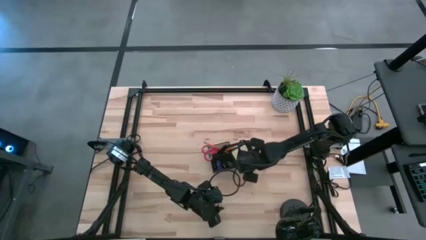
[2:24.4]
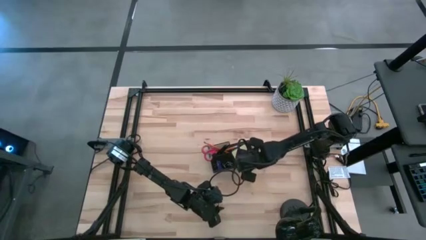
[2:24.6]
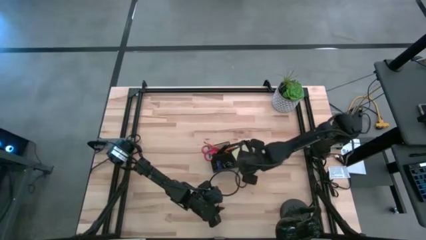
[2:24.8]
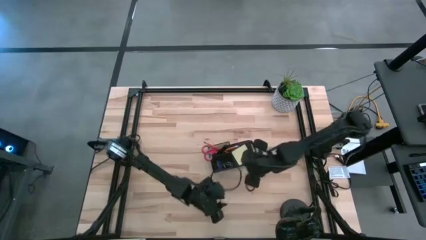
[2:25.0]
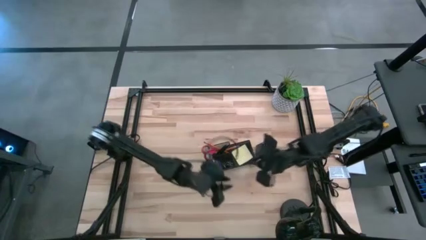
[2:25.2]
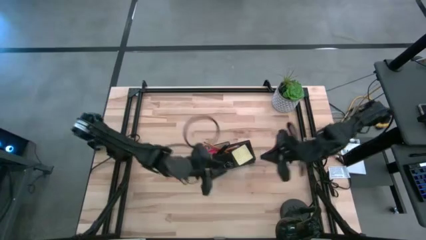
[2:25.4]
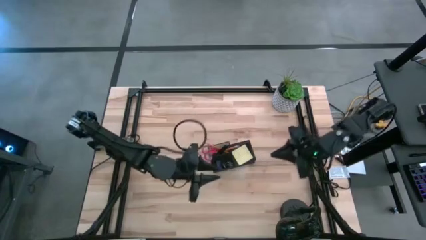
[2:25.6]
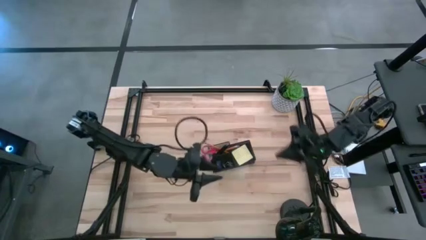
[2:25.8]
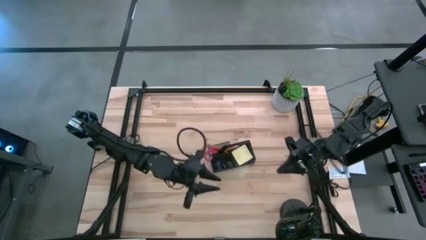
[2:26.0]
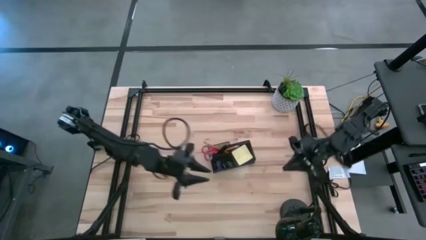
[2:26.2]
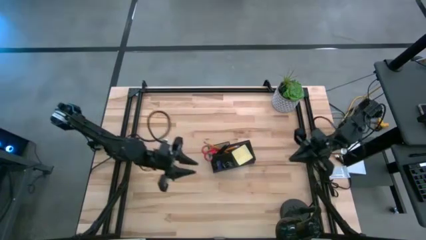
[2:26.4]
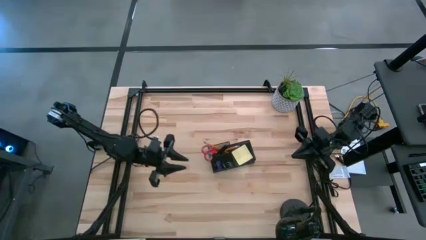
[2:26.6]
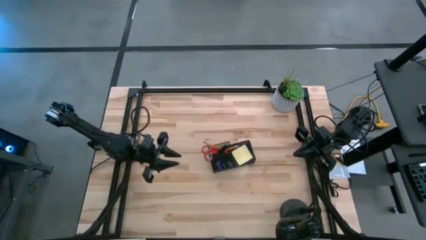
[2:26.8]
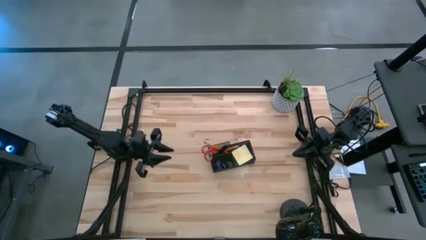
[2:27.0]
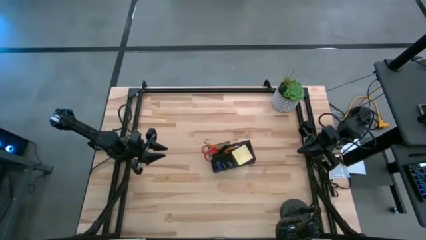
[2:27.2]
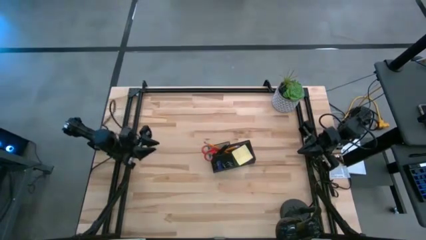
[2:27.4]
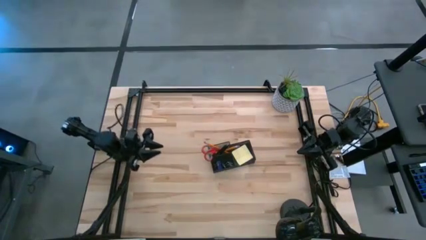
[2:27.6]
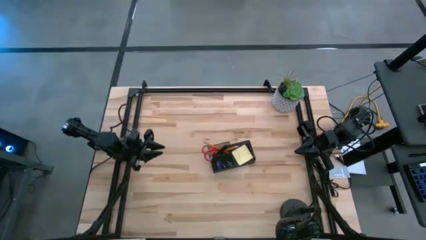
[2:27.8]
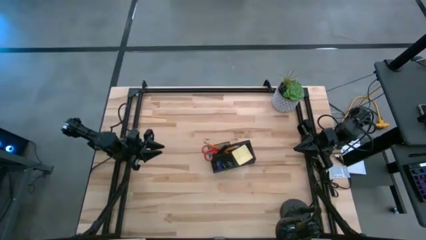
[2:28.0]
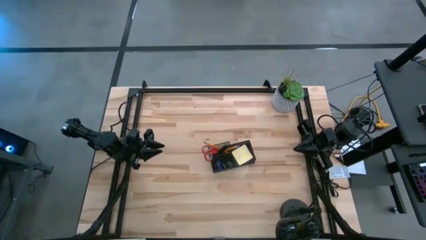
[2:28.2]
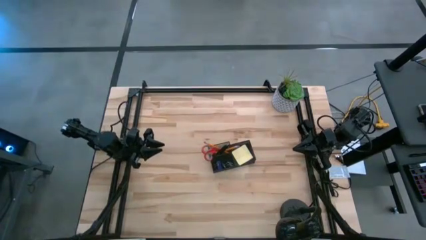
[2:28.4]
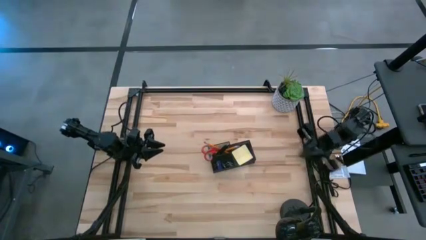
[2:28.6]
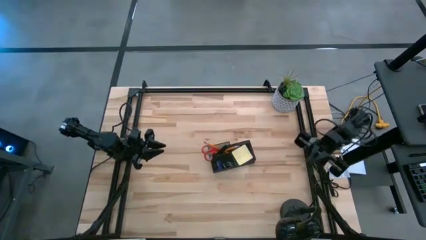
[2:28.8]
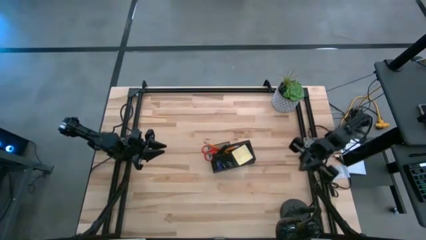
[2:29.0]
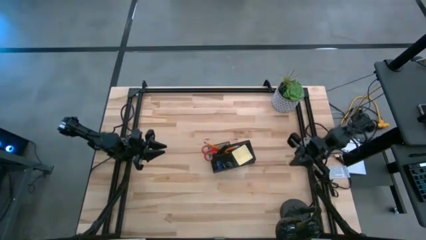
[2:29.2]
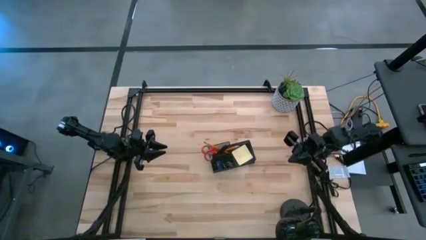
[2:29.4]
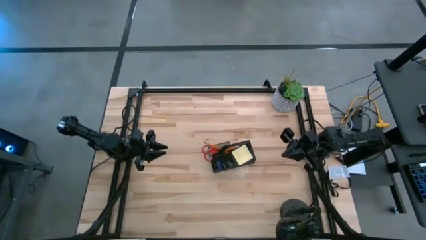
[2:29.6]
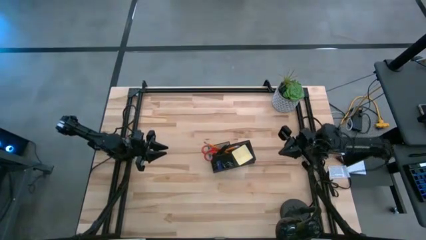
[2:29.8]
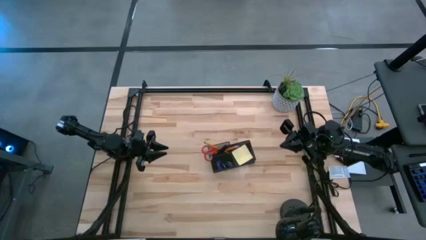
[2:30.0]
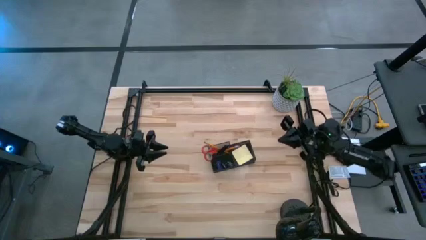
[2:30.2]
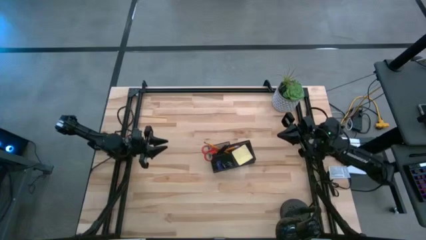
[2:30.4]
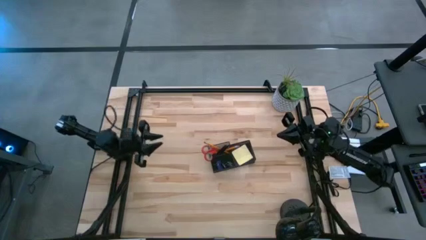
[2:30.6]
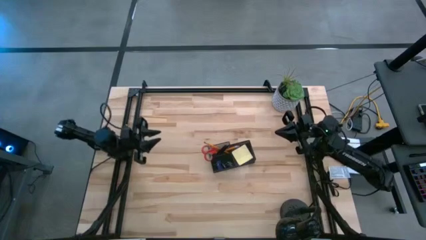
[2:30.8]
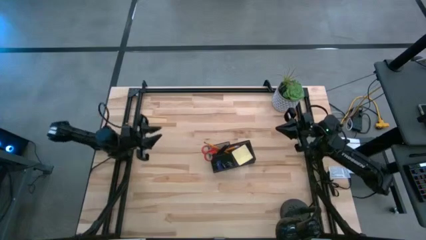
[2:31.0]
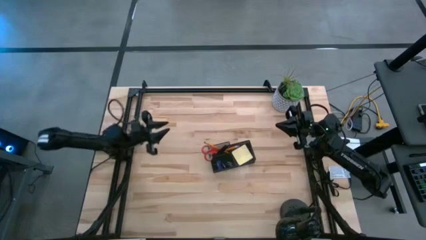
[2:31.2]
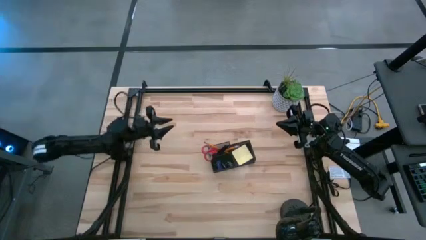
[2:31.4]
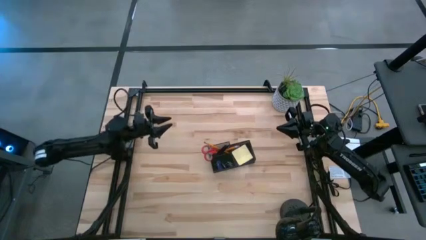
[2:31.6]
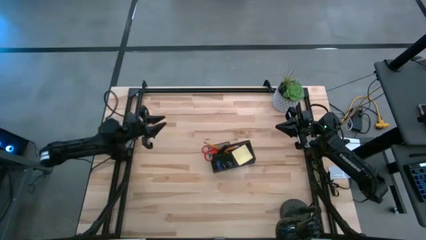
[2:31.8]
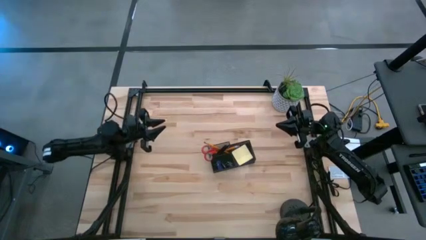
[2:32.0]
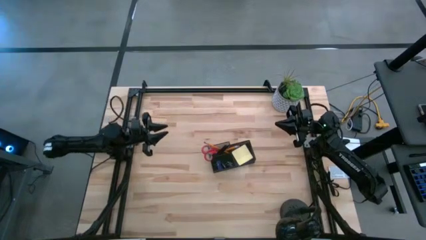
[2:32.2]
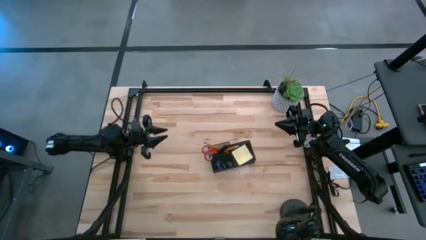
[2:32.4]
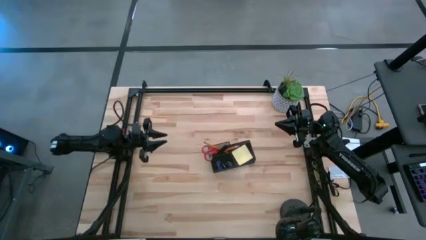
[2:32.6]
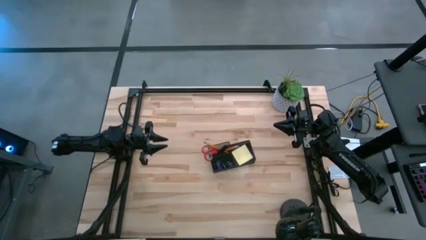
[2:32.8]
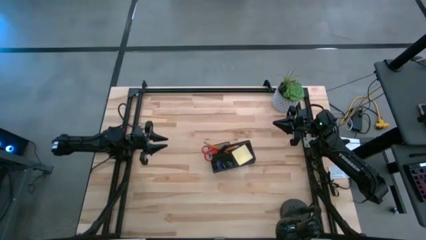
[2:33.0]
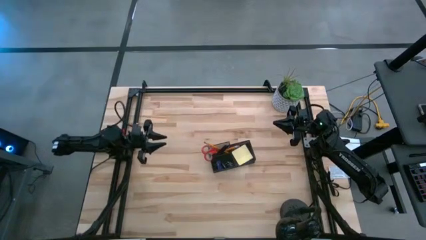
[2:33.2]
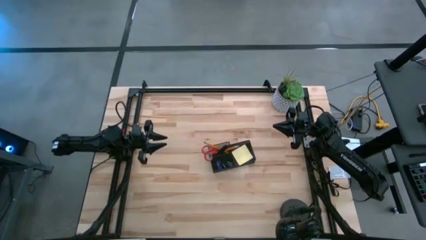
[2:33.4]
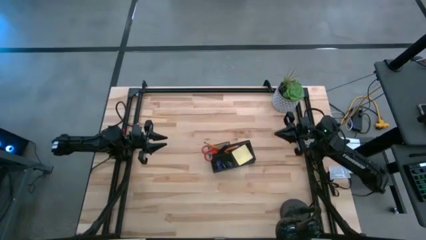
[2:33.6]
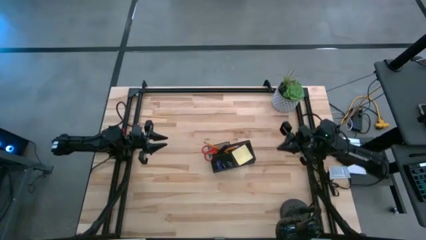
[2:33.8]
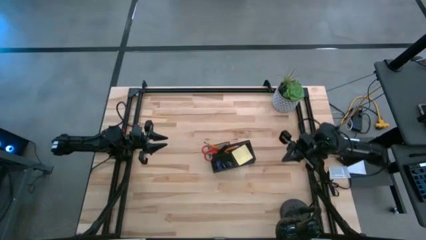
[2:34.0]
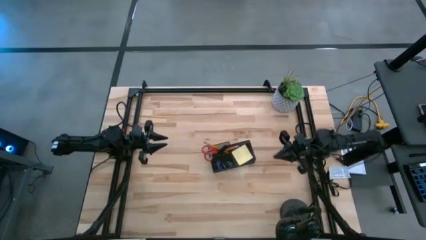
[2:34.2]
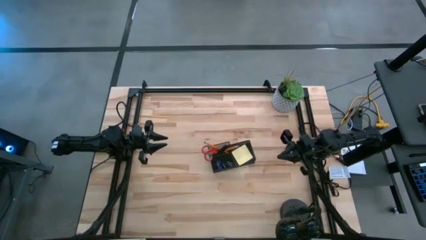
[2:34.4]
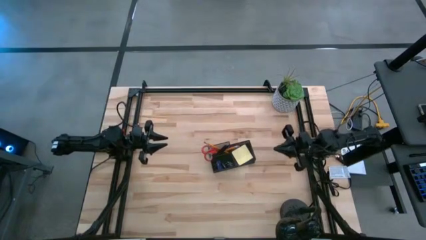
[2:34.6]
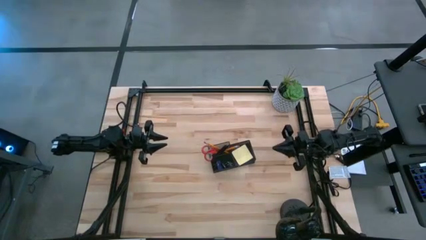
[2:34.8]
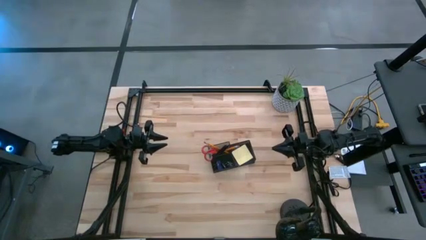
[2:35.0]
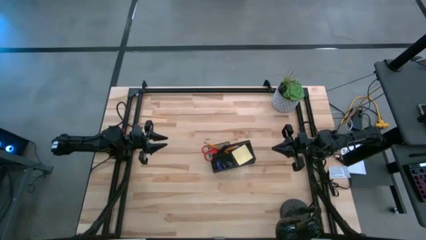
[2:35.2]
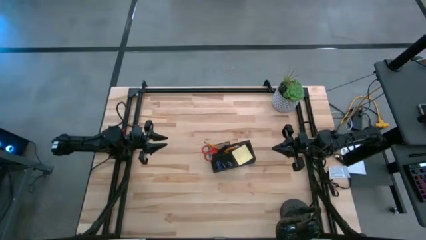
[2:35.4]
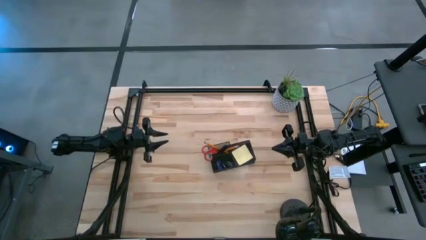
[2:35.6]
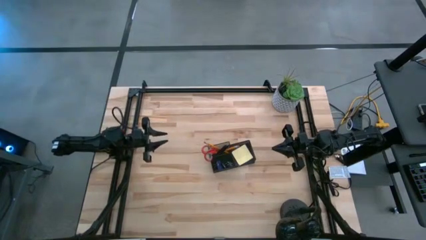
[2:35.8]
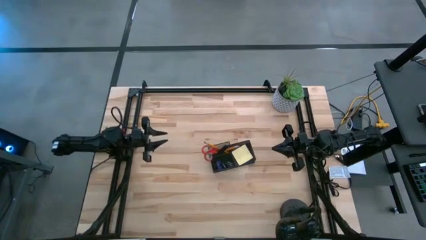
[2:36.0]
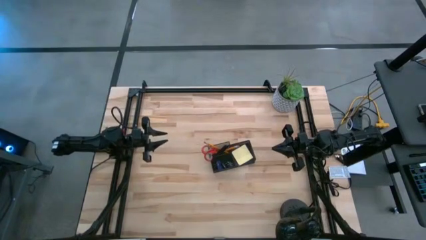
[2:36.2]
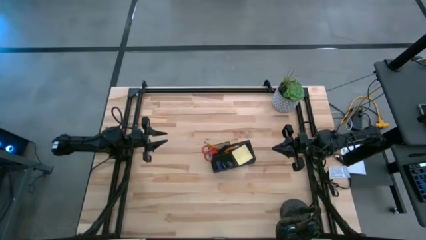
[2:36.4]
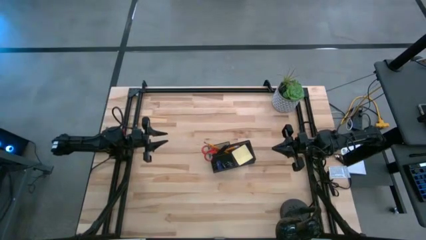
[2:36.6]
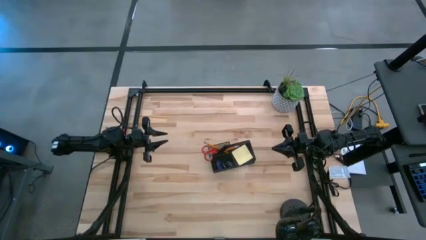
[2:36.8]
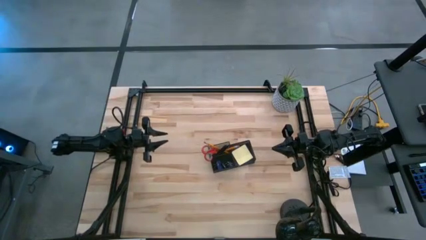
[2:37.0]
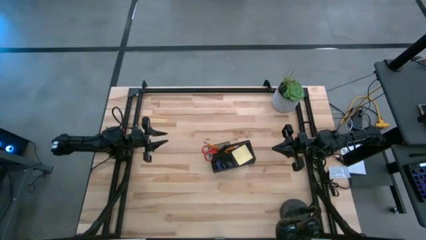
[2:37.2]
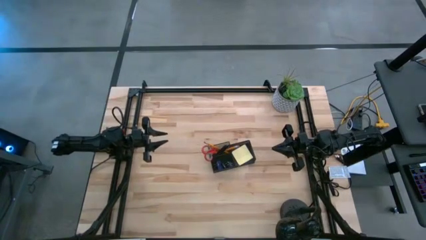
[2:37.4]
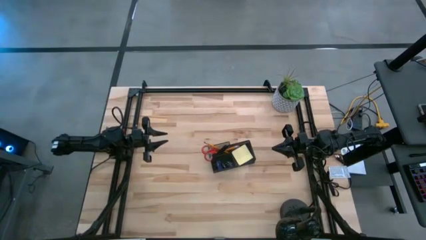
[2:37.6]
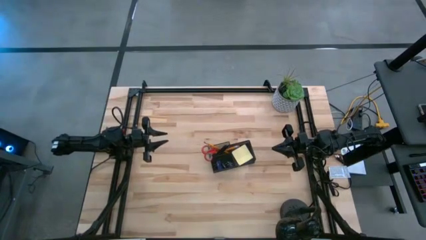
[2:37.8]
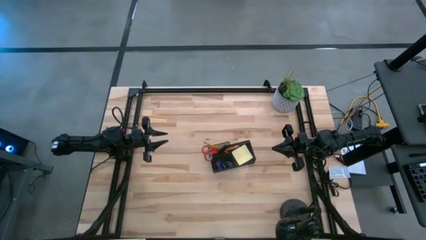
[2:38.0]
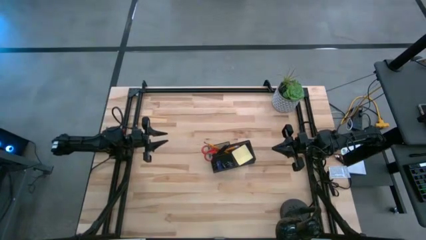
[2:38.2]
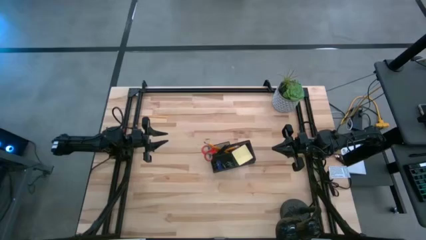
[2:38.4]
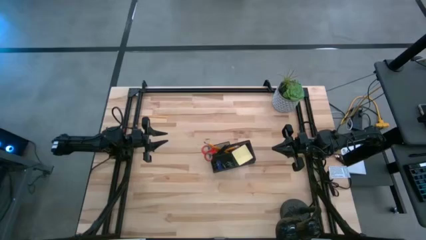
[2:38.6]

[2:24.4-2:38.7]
Task: Pick and place office supplies into organizer
Return to Home Position

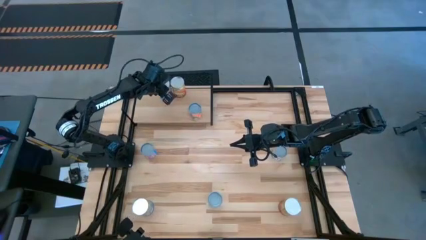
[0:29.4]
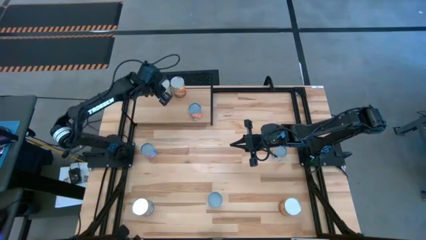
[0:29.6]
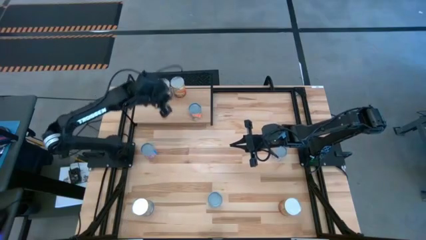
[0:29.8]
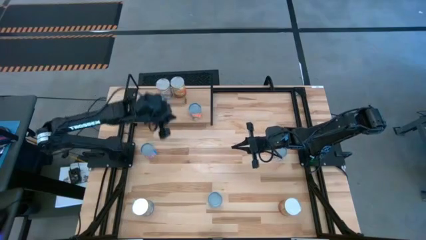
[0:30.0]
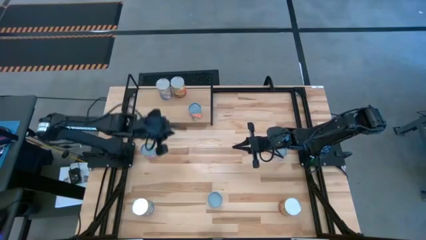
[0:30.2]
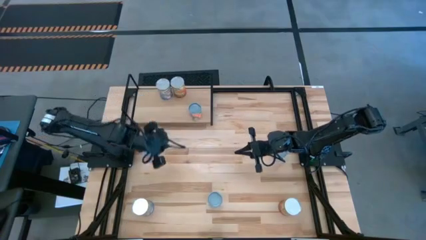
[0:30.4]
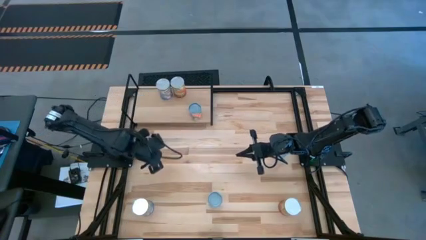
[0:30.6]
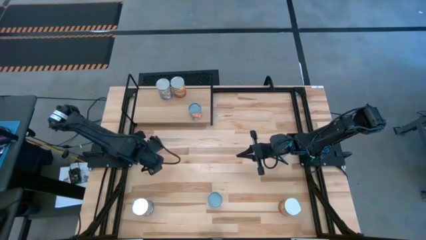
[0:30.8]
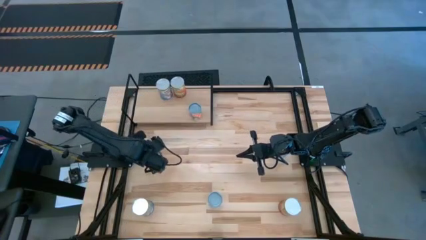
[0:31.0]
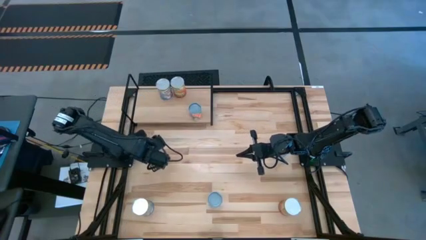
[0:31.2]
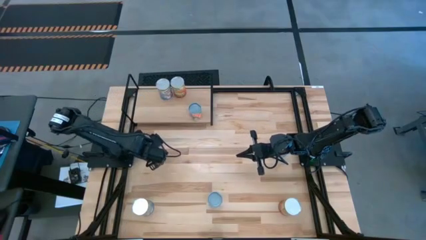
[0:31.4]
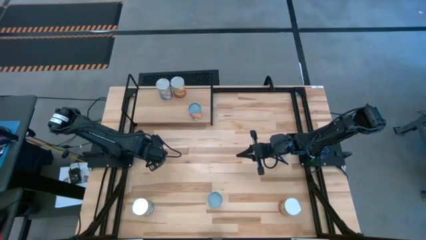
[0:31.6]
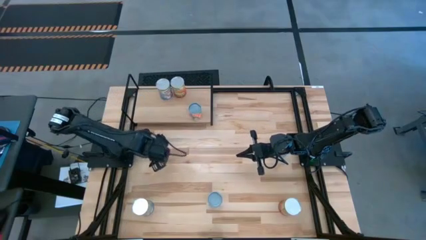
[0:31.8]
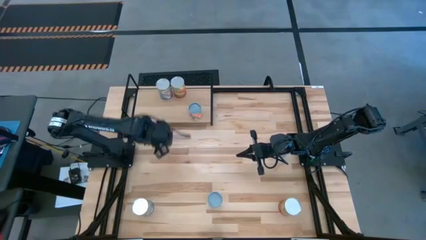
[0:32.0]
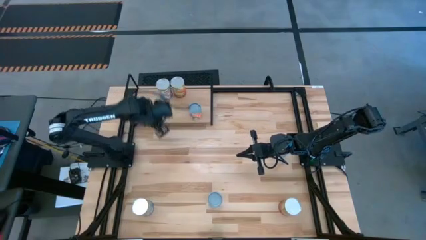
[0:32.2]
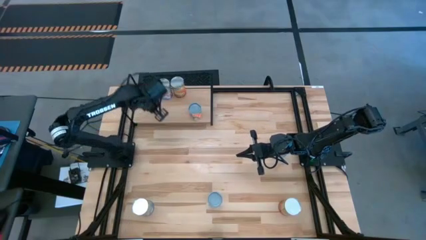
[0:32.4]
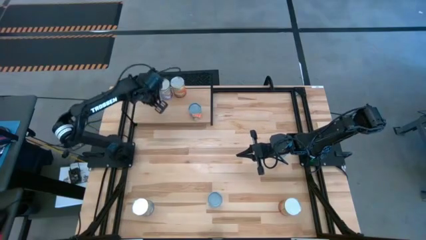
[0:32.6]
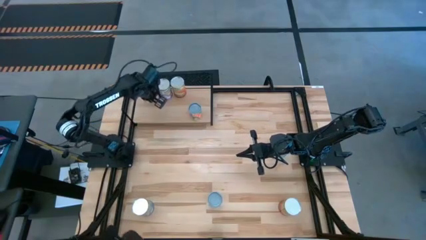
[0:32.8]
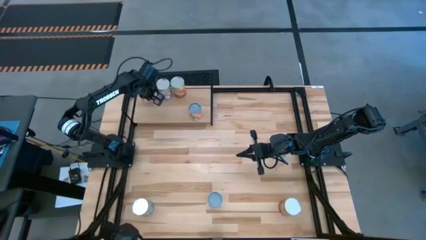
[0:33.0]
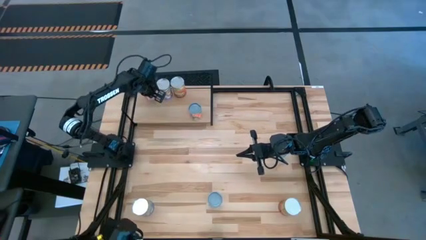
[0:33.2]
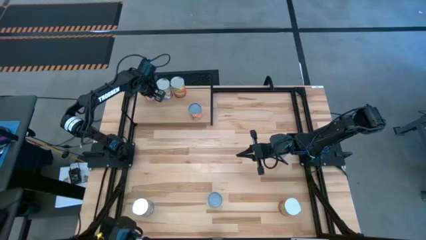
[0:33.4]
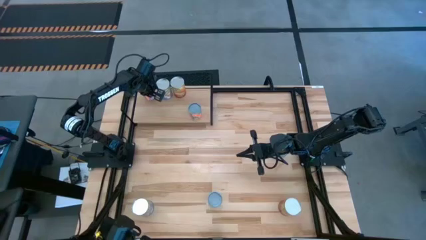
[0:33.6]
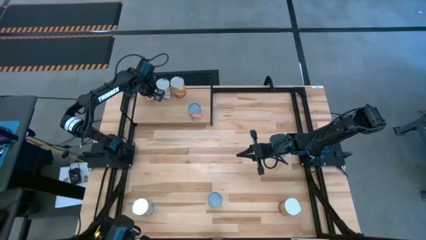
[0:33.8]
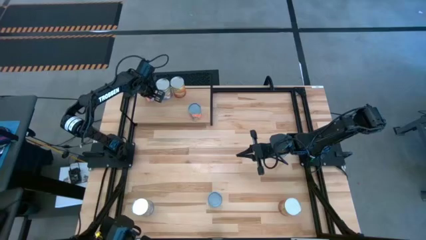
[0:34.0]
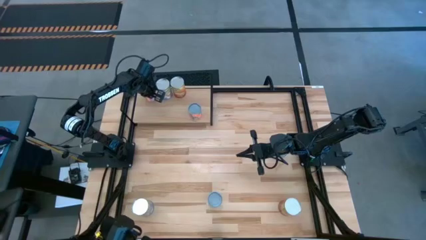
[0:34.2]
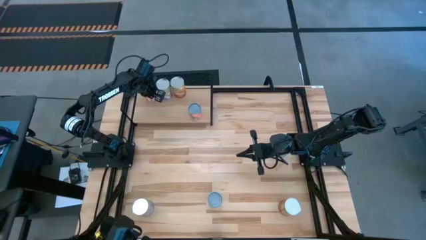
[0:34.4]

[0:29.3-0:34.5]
Task: Pick and place cans onto a shelf
Put the small canned corn on the shelf
